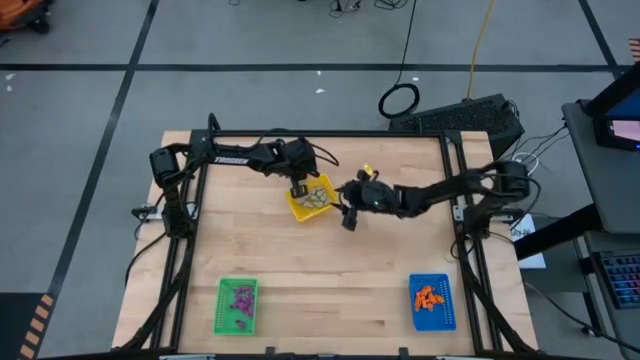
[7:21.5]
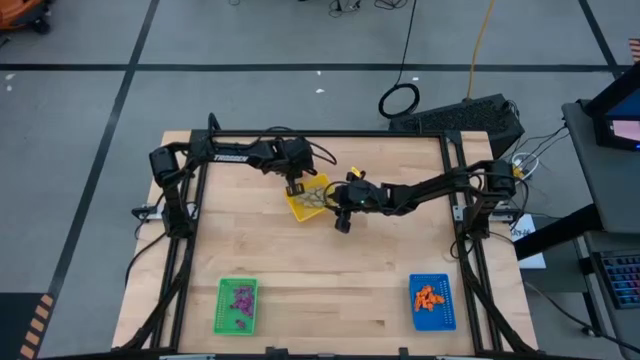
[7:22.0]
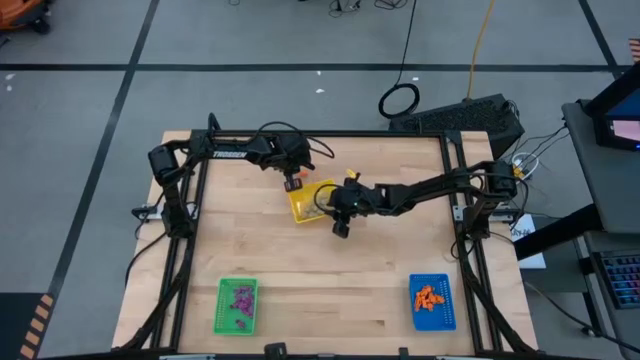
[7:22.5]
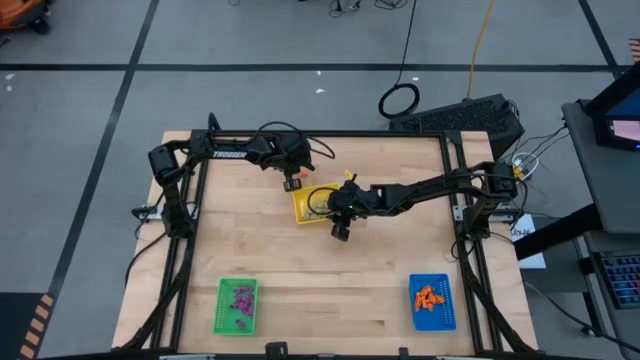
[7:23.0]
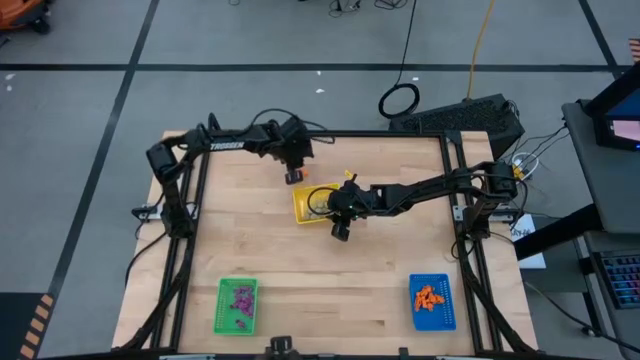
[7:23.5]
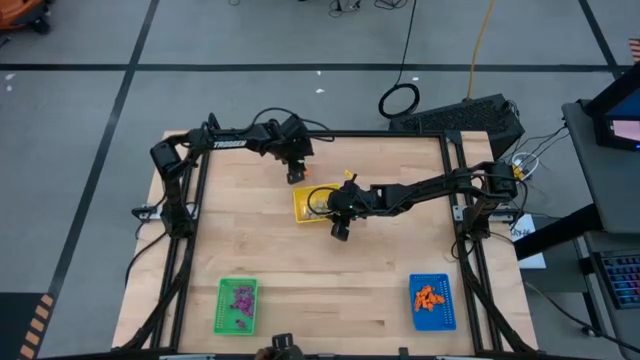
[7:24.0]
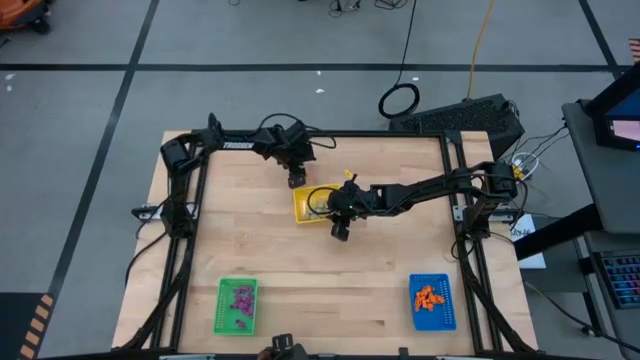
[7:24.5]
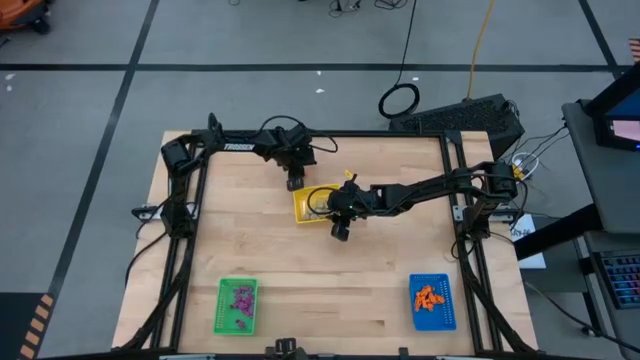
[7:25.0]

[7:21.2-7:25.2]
Task: Sort Halloween decoration
Put the orange skeleton toy in the blue basket

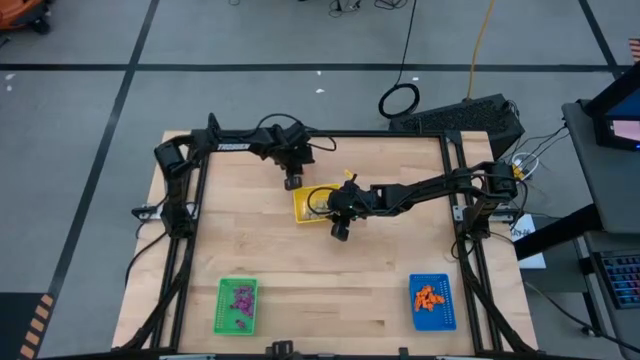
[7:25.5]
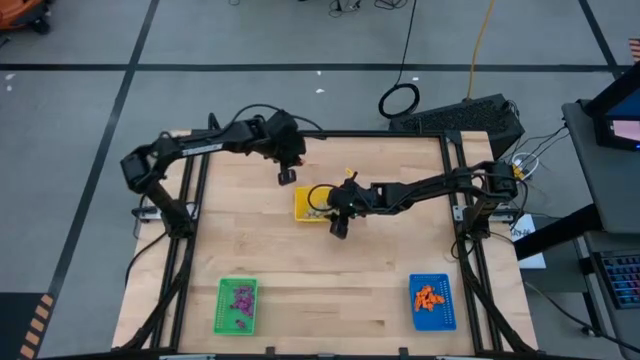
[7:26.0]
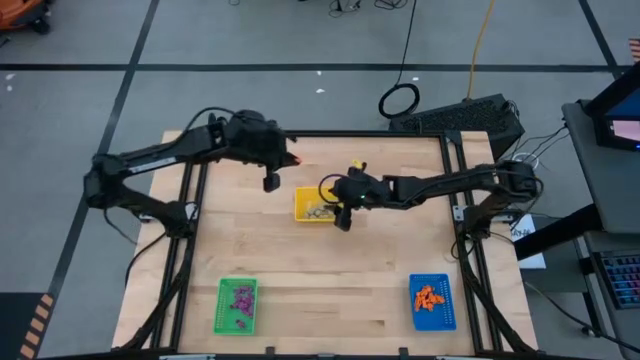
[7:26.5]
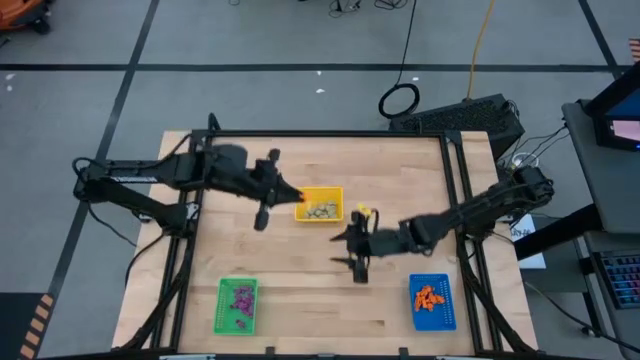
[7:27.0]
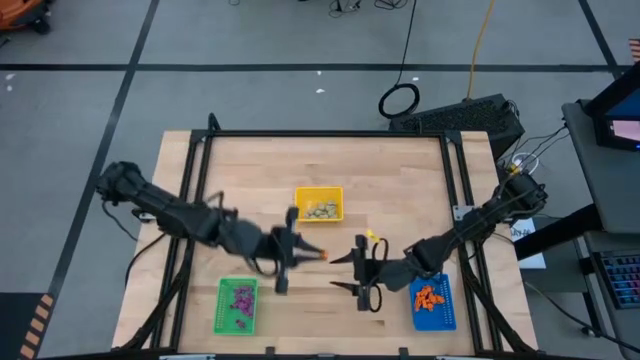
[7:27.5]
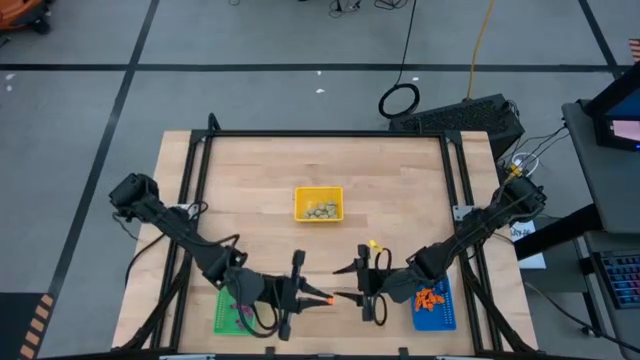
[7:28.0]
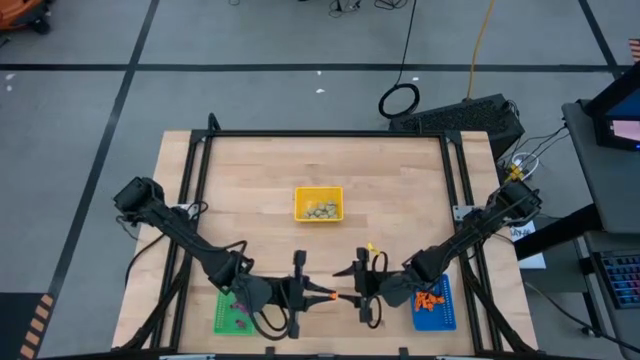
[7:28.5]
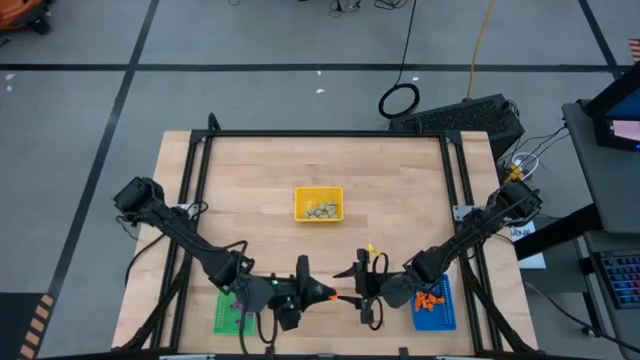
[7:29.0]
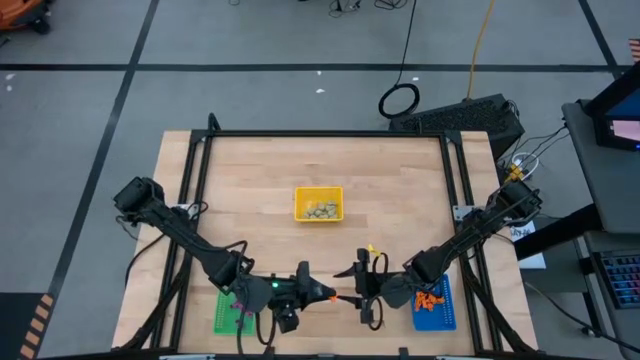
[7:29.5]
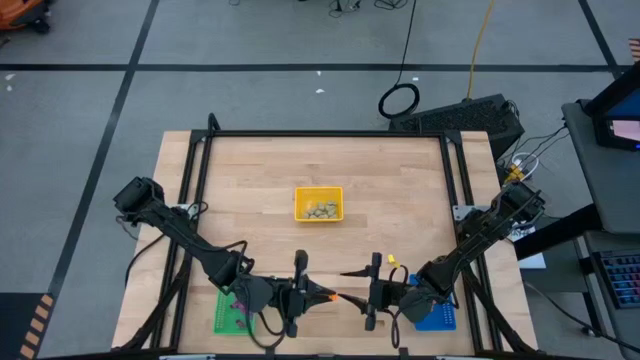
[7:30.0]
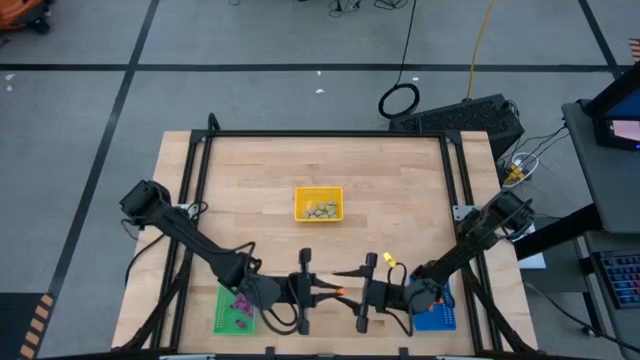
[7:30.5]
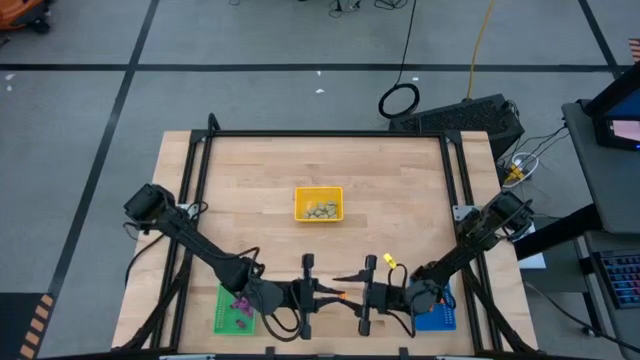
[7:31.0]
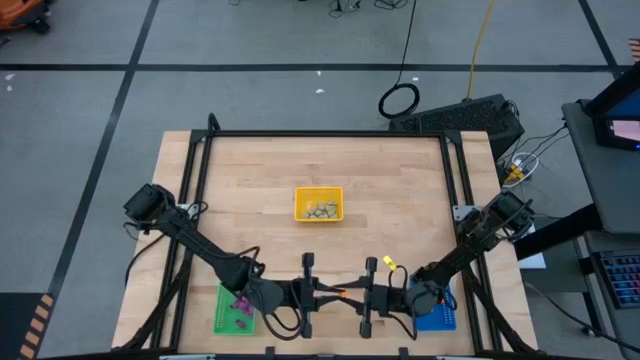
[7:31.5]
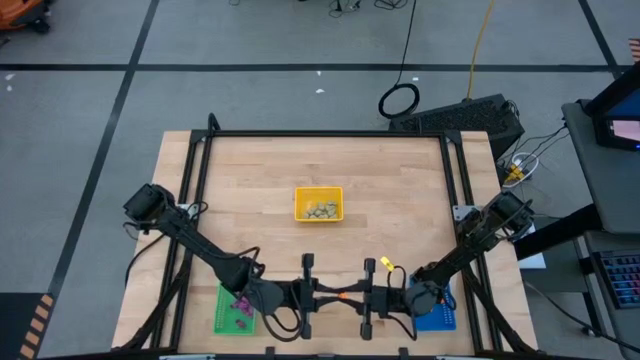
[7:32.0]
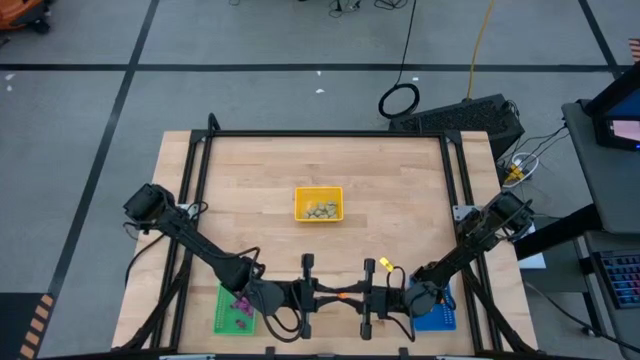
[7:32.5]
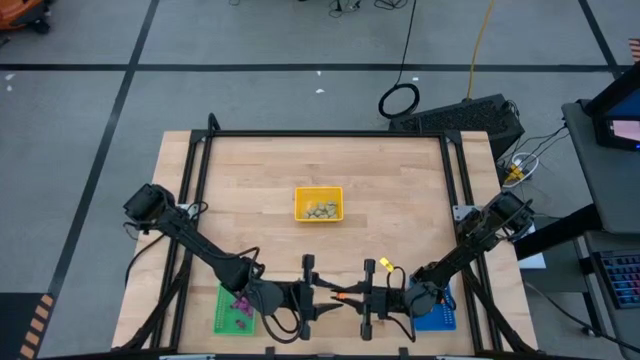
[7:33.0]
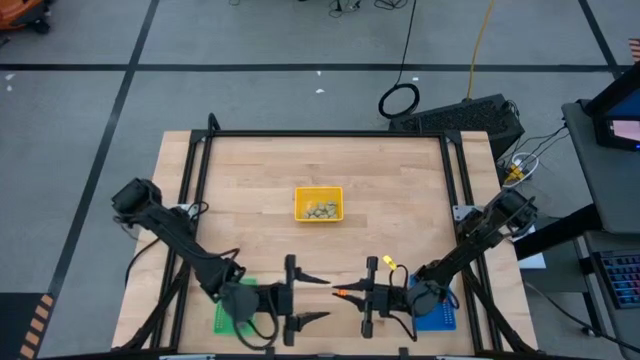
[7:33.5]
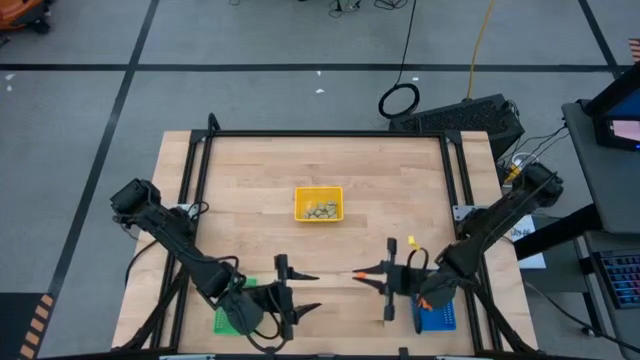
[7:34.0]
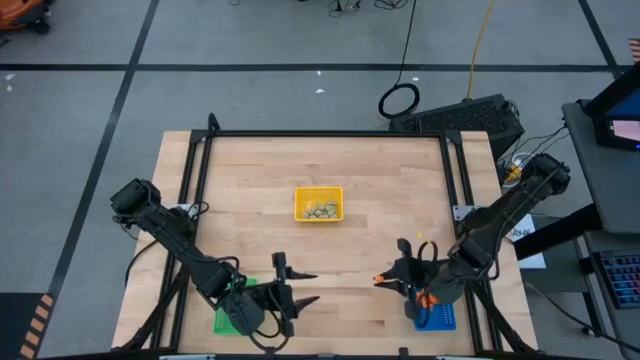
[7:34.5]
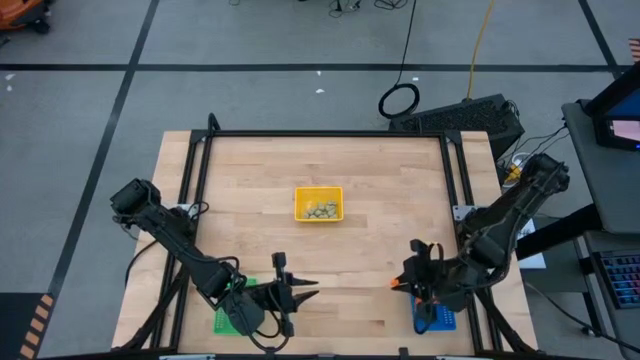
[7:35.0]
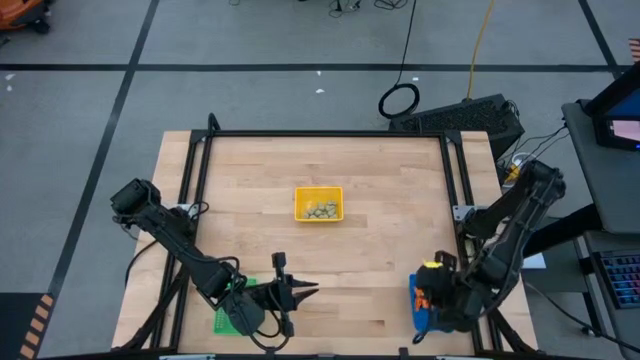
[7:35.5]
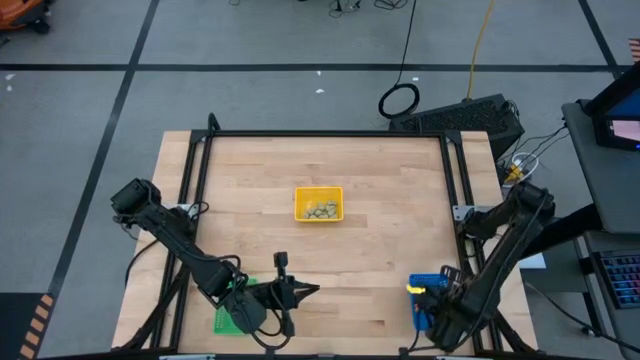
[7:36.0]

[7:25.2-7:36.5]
Put the orange skeleton toy in the blue basket
